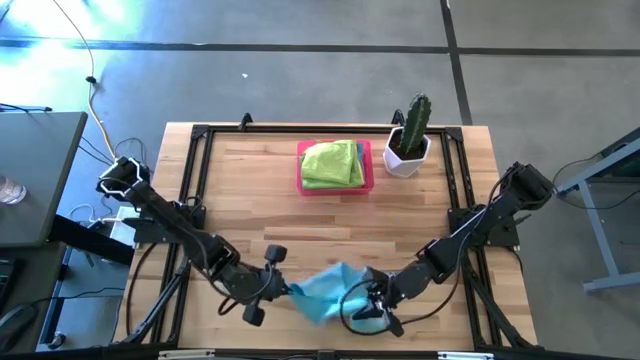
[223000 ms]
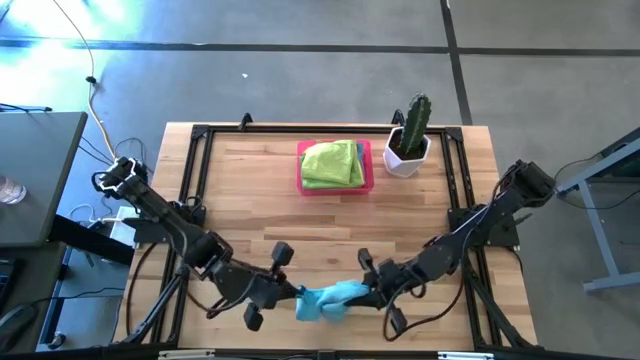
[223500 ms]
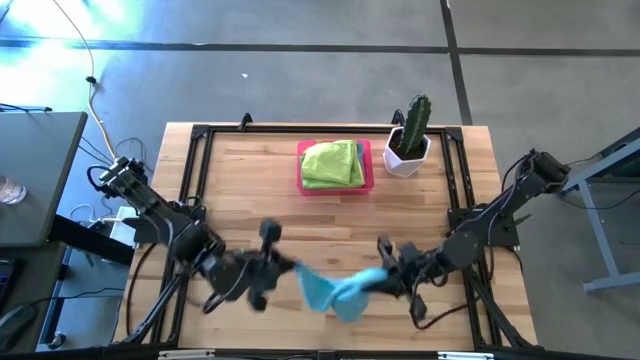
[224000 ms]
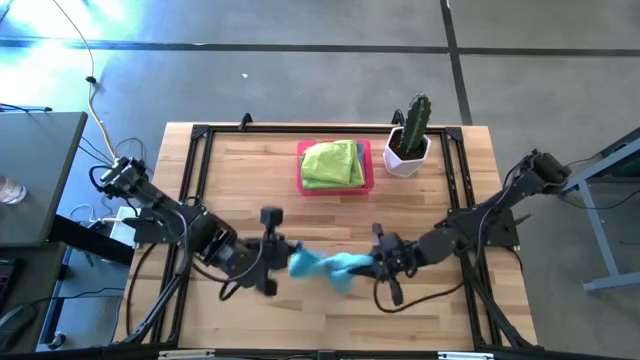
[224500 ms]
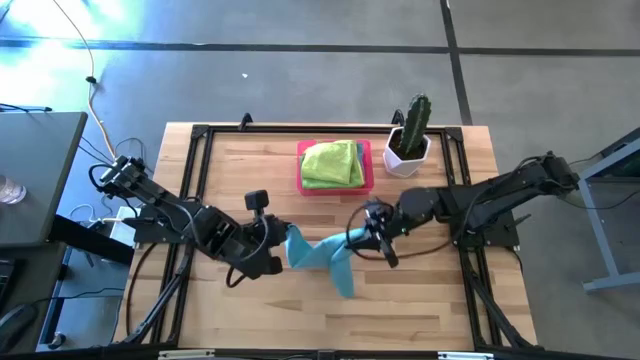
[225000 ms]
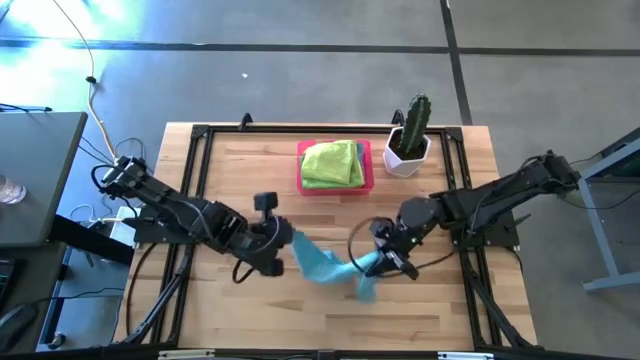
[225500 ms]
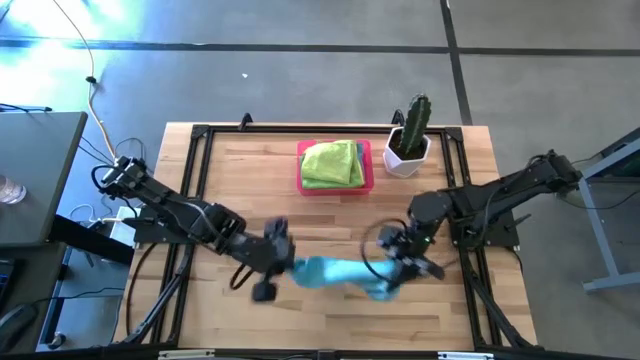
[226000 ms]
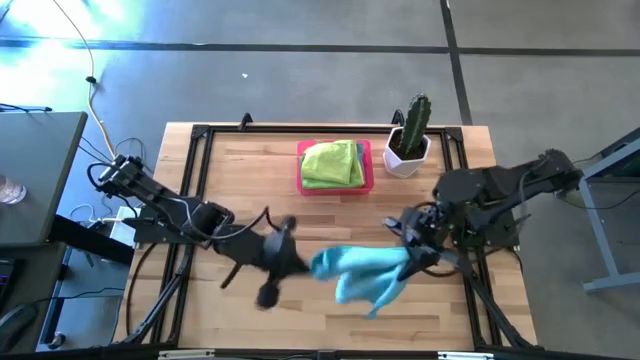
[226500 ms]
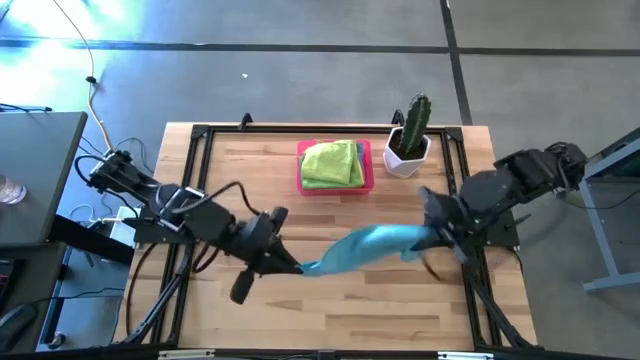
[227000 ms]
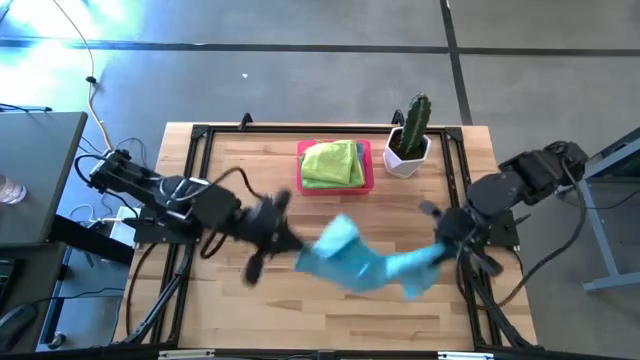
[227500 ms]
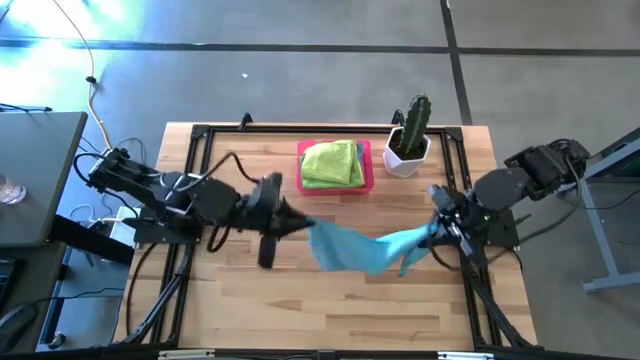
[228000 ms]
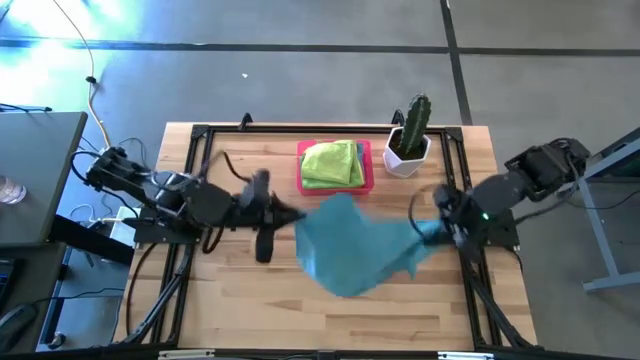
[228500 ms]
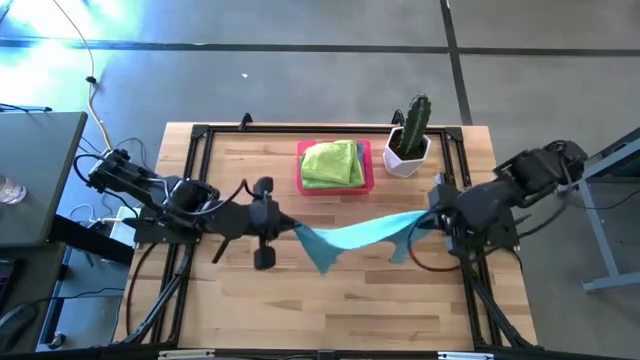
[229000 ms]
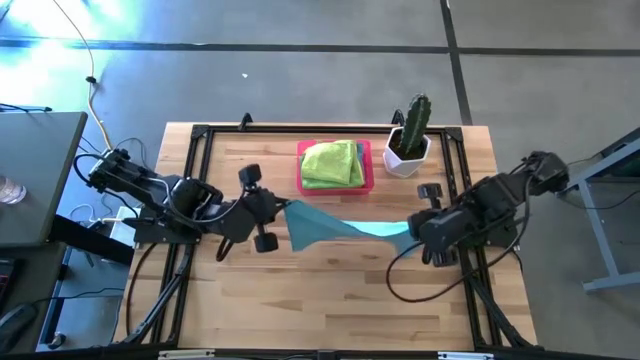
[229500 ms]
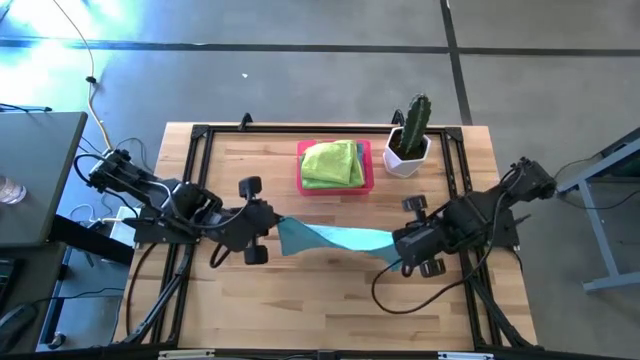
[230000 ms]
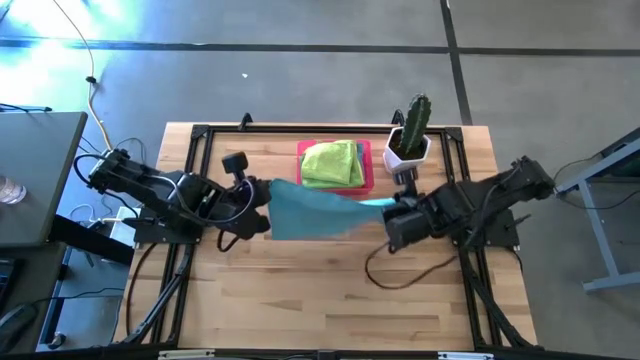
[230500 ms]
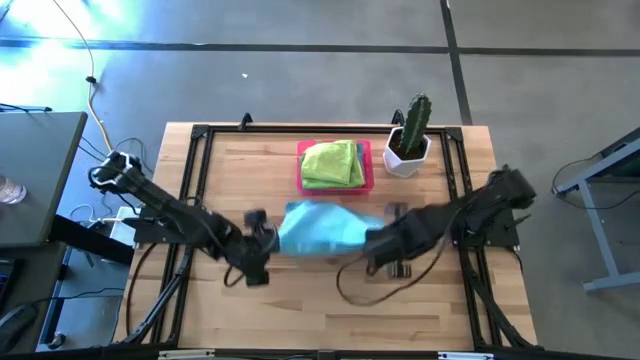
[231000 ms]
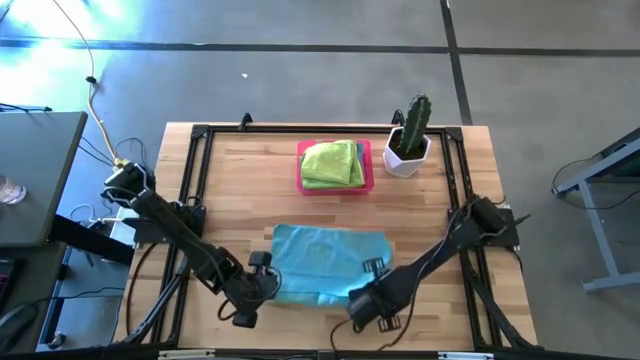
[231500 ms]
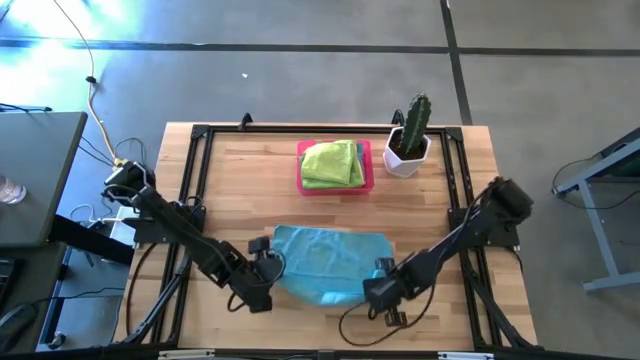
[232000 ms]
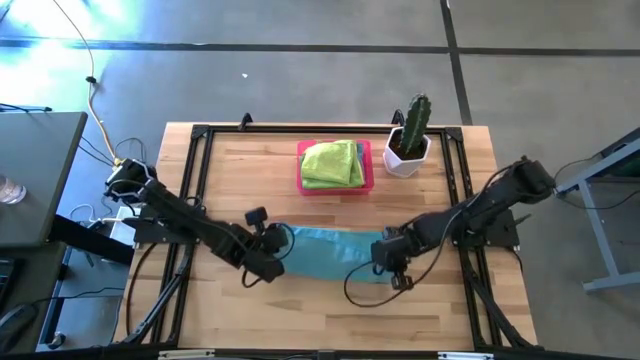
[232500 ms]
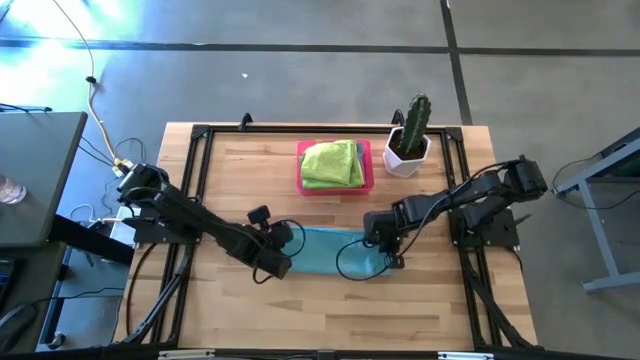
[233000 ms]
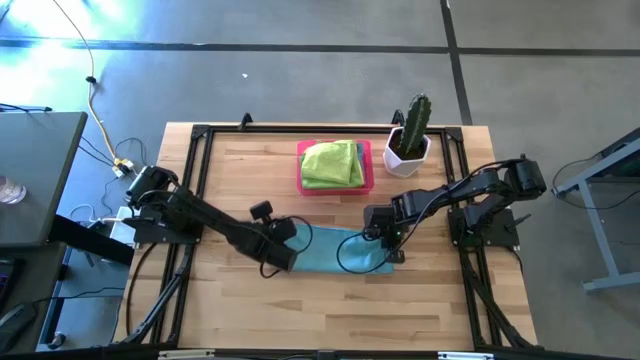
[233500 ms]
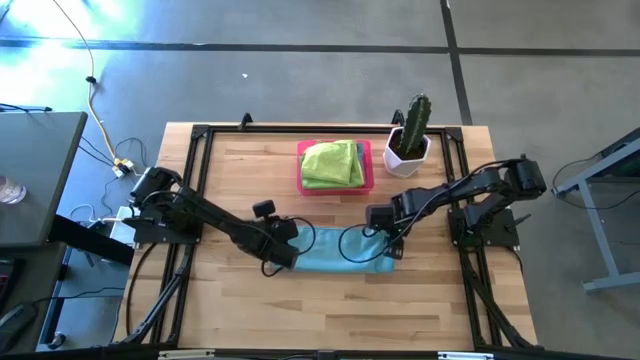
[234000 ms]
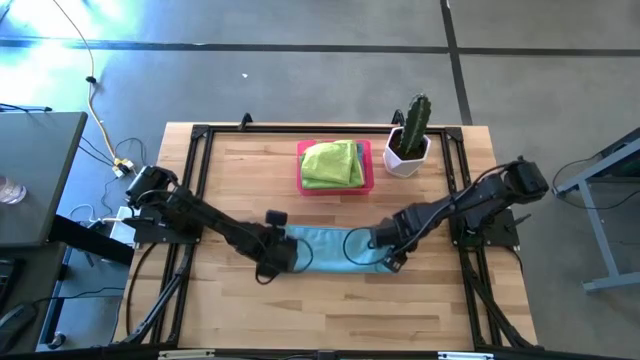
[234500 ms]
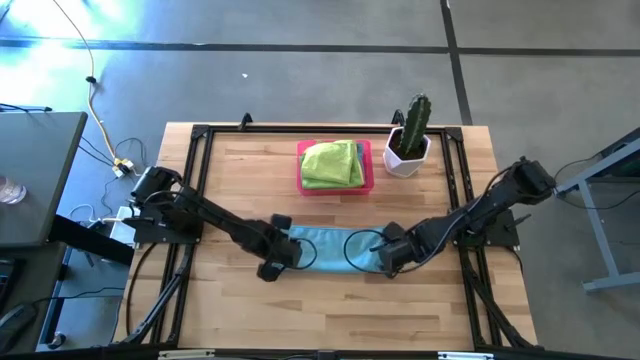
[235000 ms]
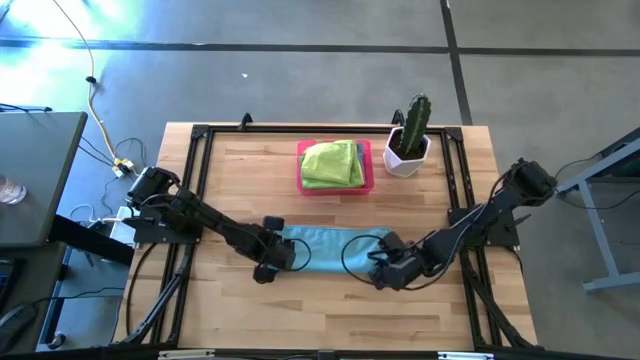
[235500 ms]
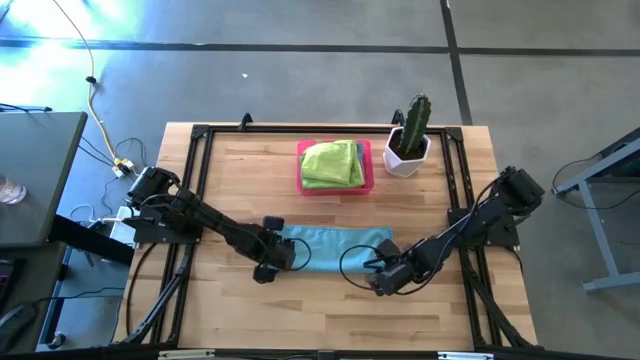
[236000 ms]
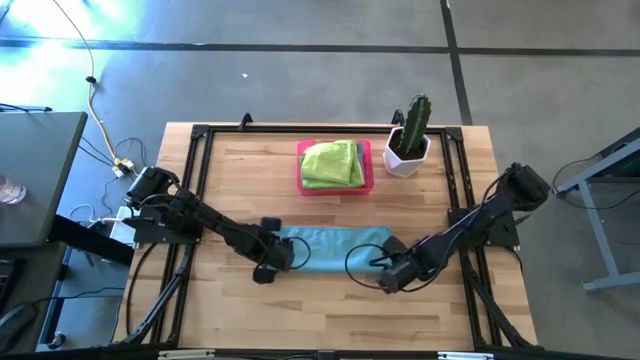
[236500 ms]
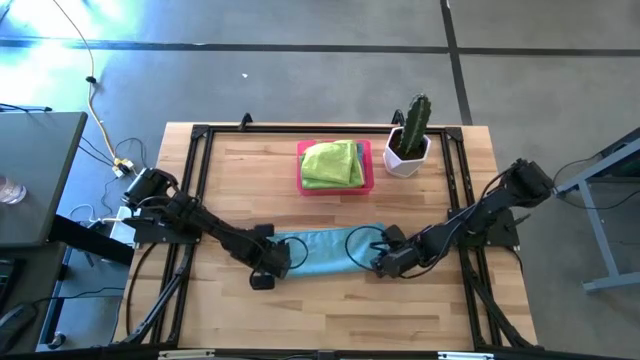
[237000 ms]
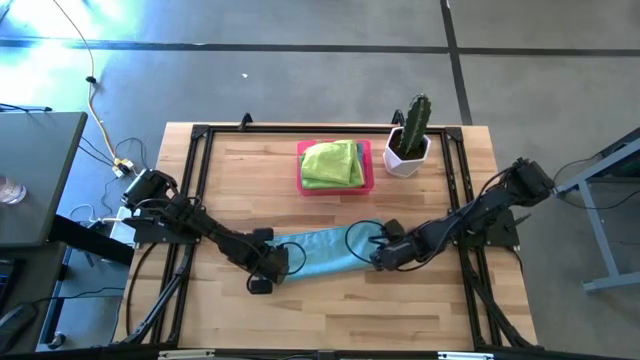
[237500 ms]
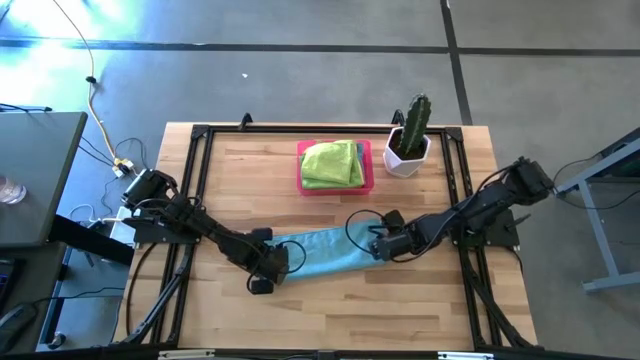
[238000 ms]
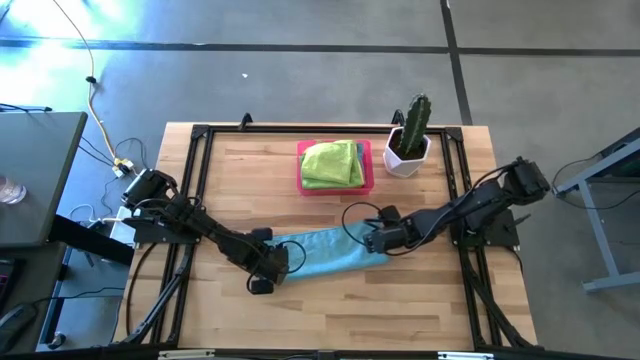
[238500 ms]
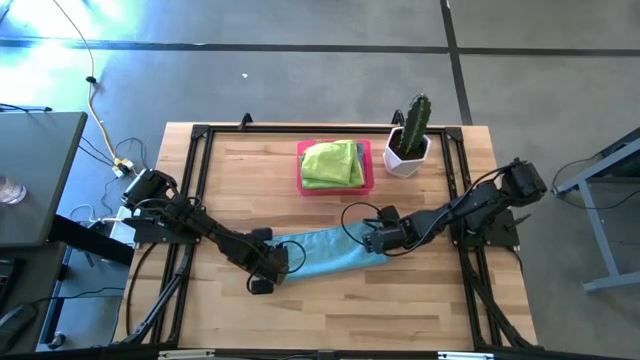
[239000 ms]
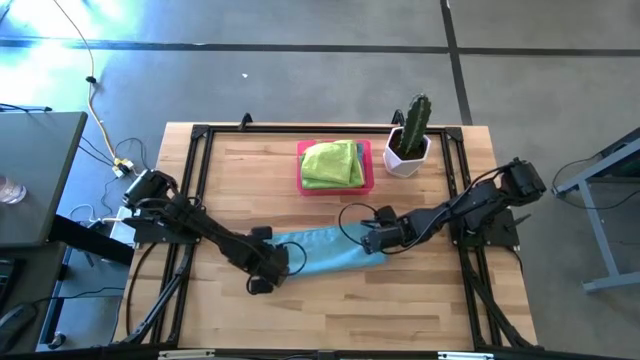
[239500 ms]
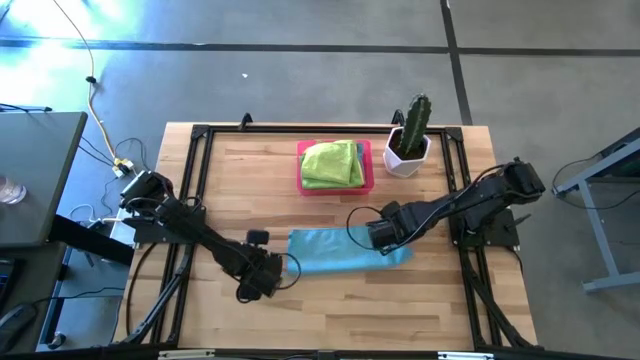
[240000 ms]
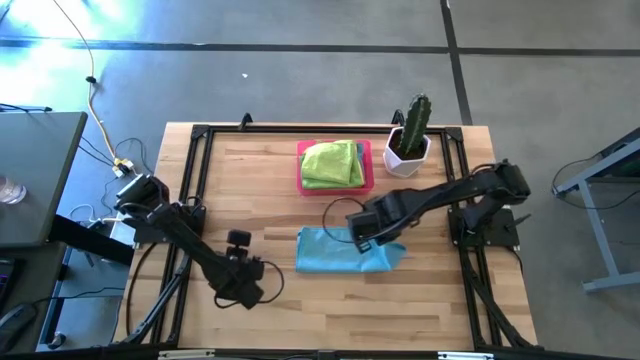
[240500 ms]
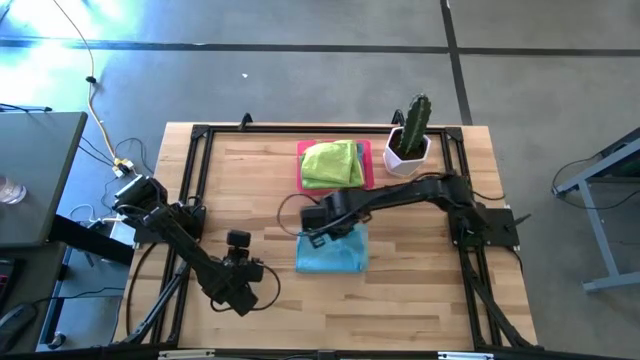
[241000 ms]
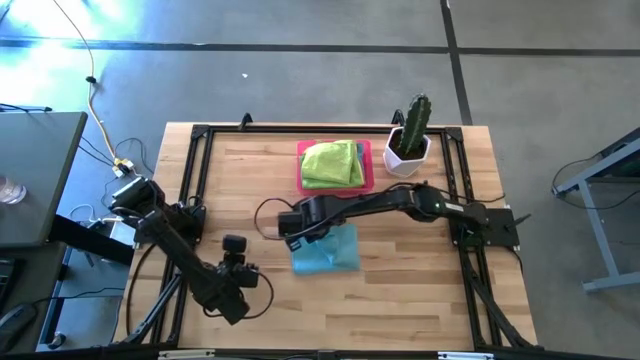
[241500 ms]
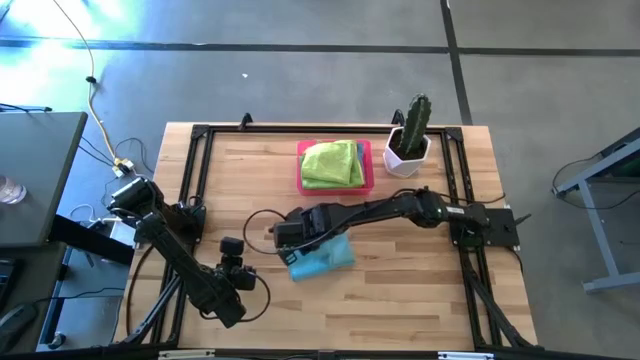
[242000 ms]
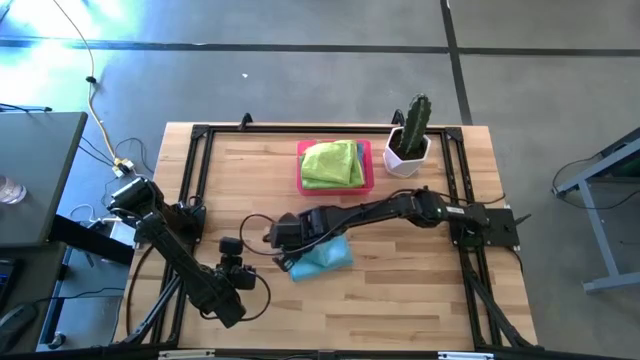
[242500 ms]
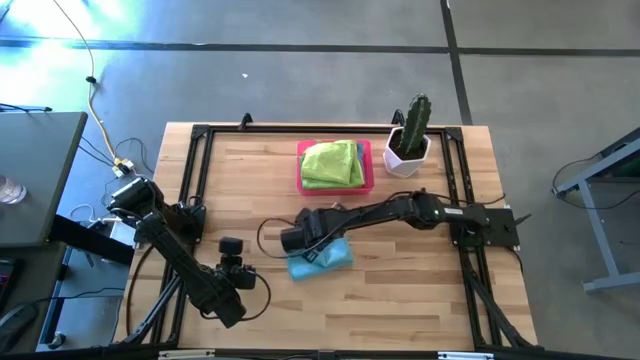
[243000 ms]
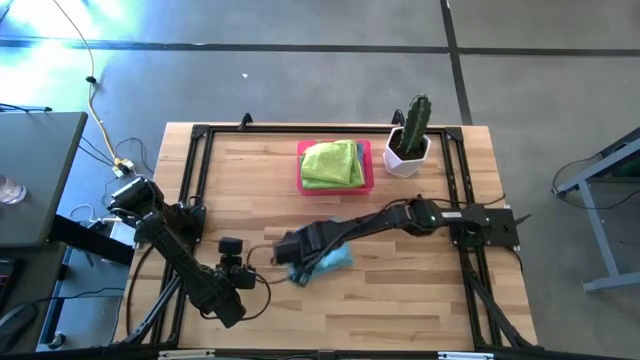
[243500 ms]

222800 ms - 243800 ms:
Task: Fold microfiber towels
Fold the blue microfiber cloth
